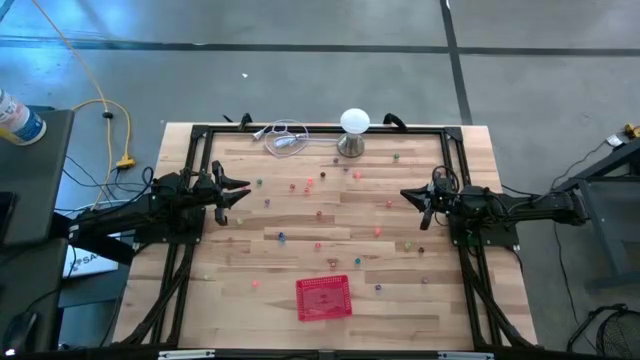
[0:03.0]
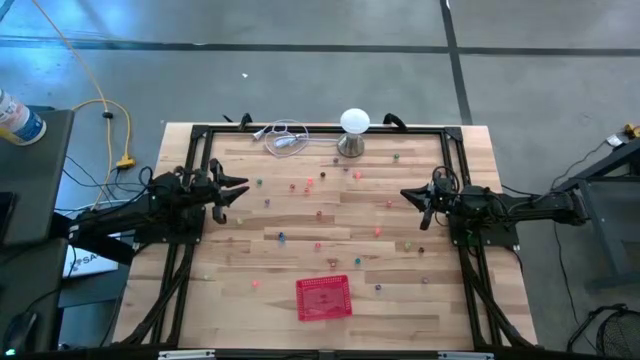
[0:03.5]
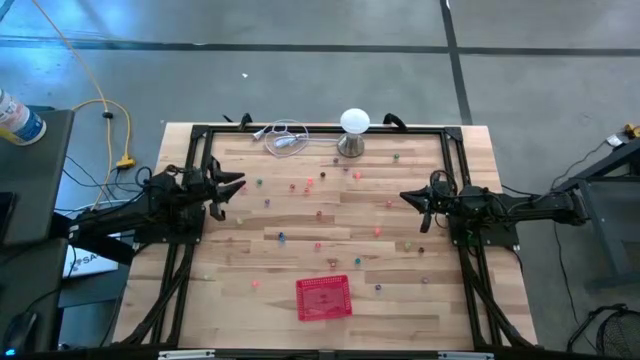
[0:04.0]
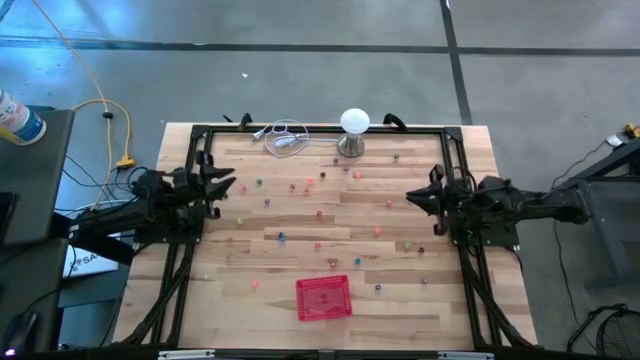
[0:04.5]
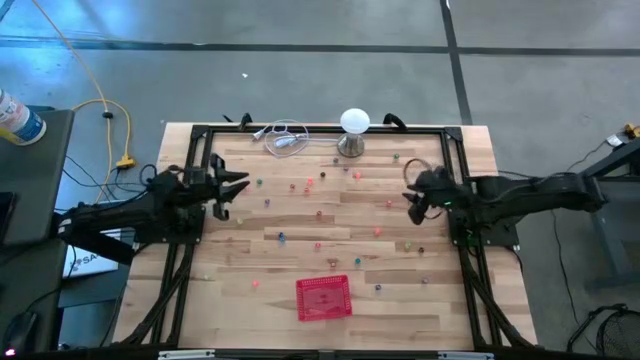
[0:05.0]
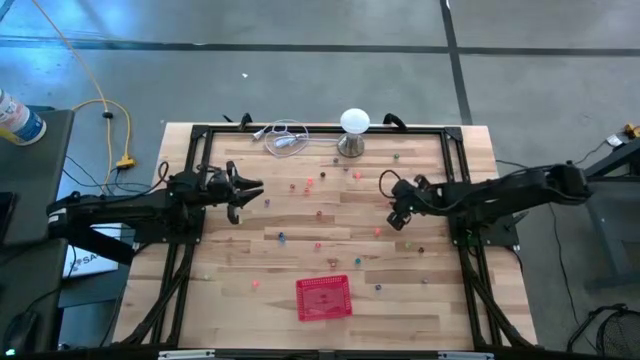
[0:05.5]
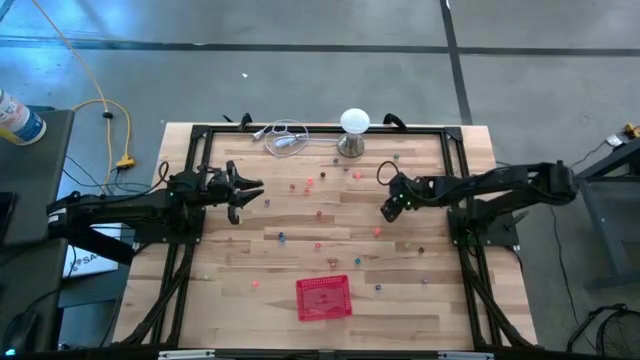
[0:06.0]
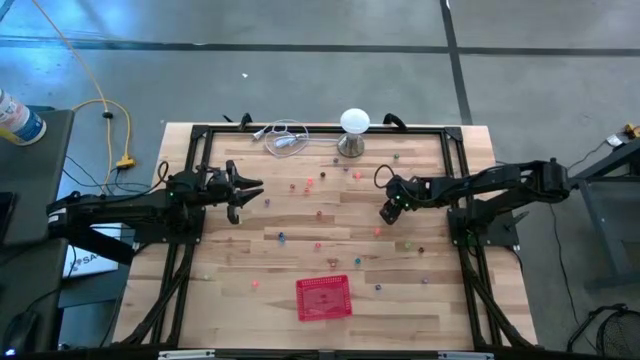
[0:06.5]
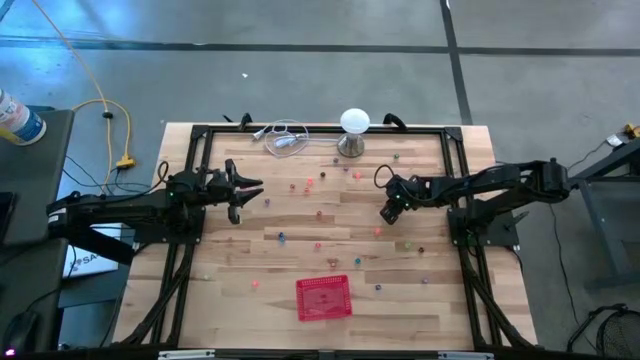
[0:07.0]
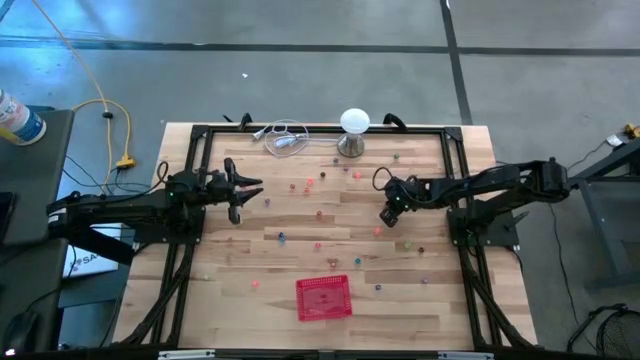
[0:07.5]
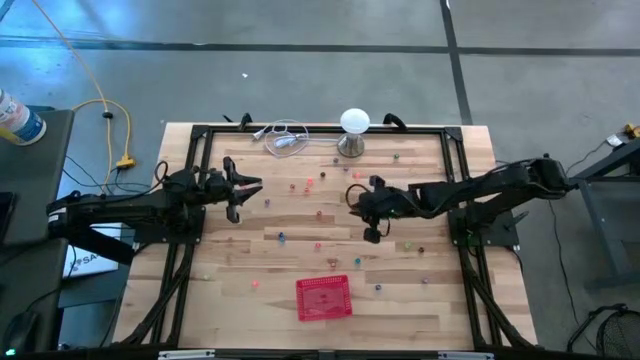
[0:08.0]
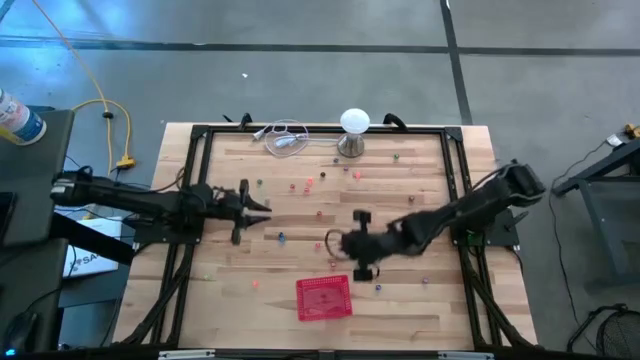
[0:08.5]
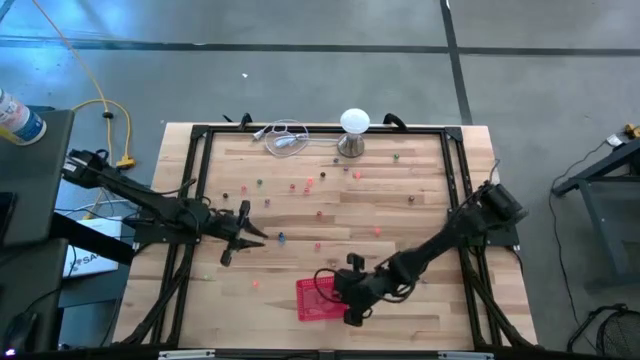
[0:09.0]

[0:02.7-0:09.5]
Task: Pick & Place Dice
Put the red dice into the red bin

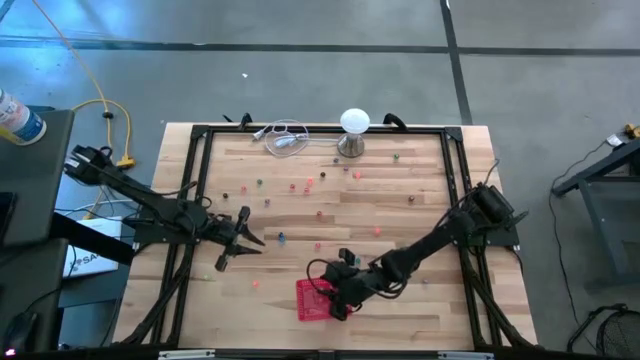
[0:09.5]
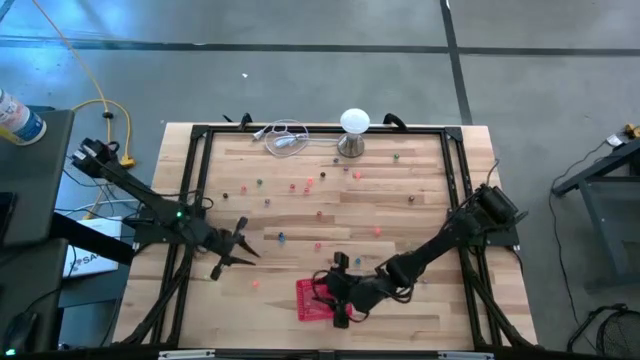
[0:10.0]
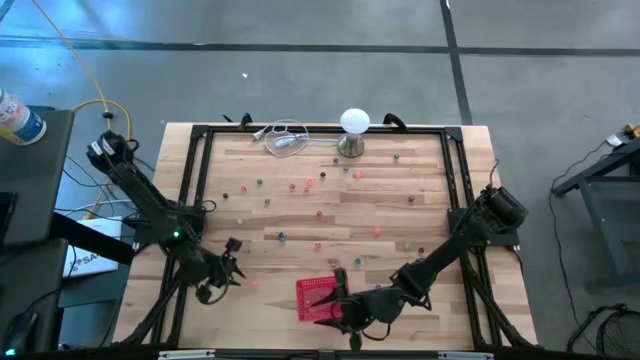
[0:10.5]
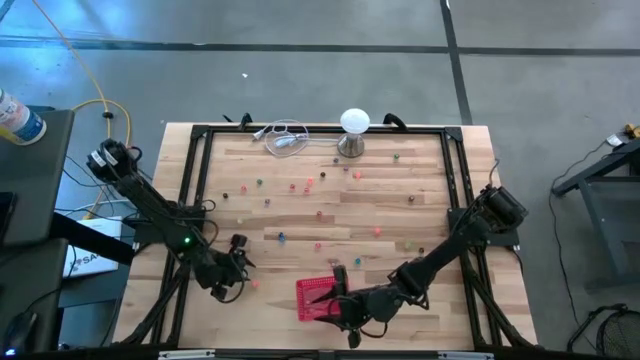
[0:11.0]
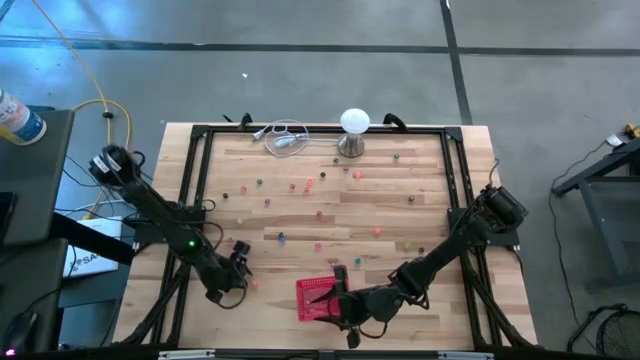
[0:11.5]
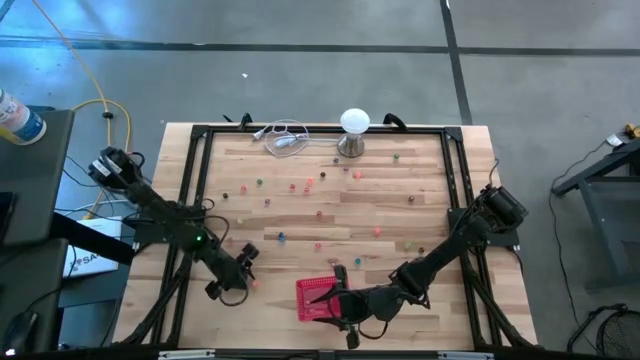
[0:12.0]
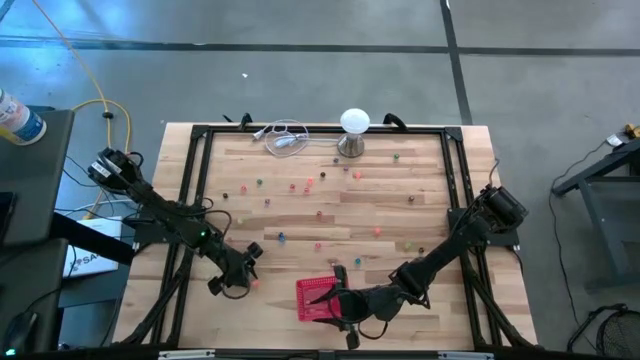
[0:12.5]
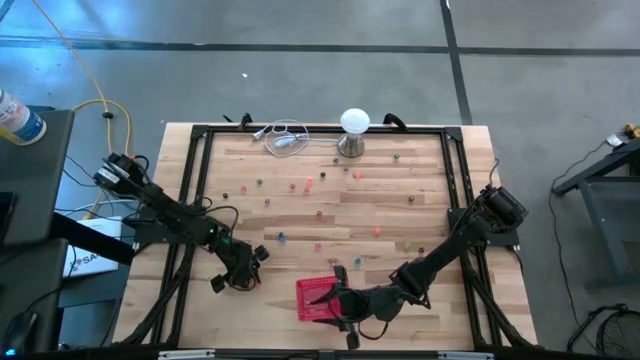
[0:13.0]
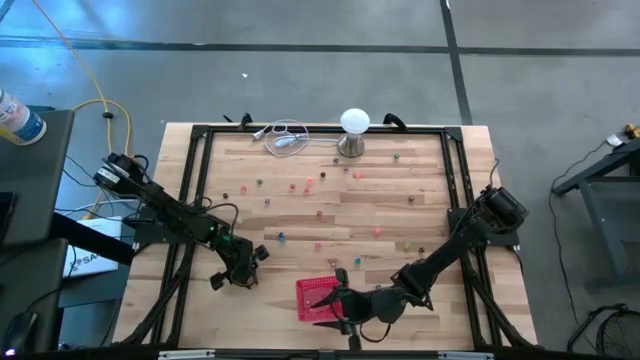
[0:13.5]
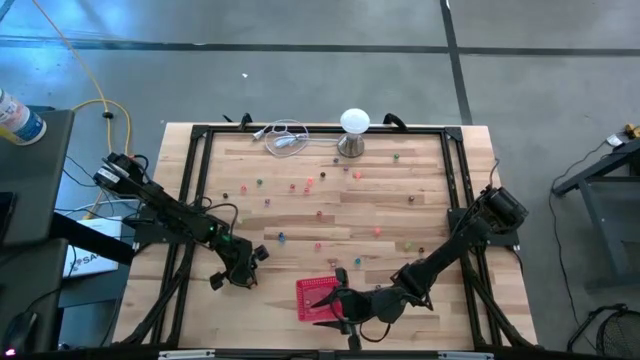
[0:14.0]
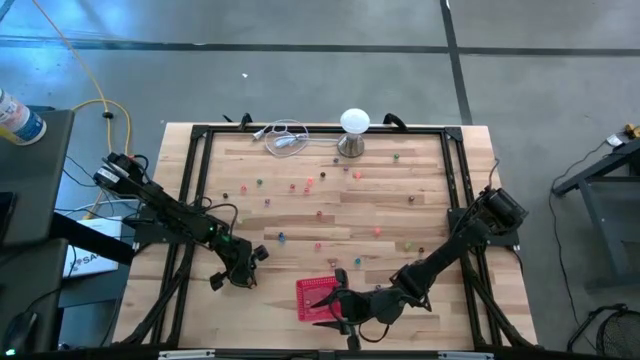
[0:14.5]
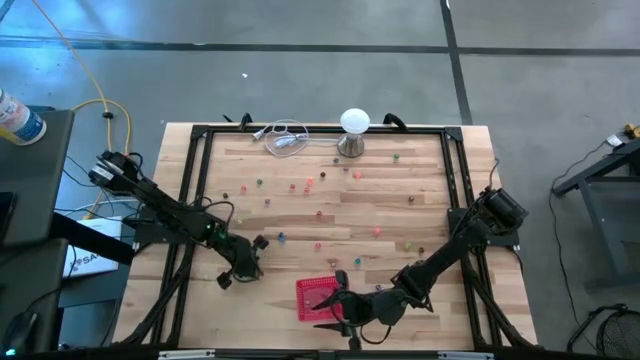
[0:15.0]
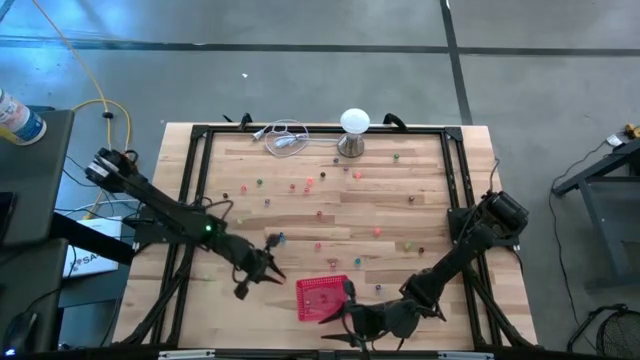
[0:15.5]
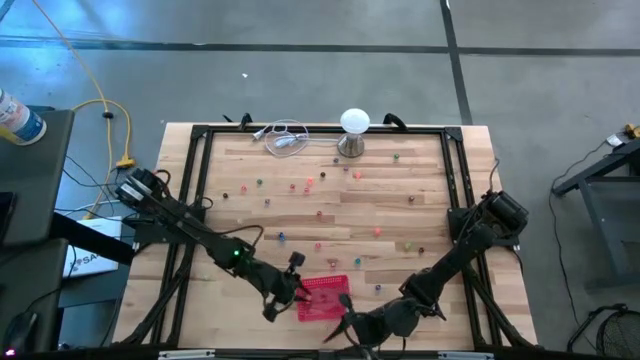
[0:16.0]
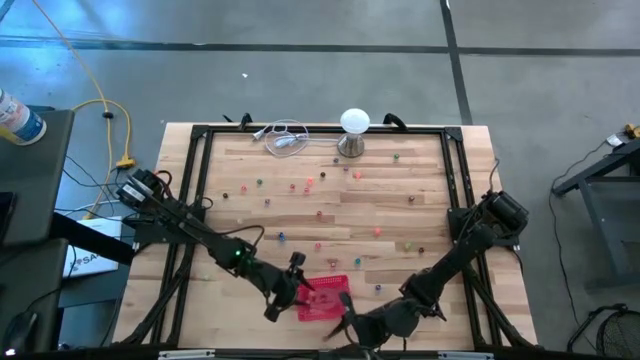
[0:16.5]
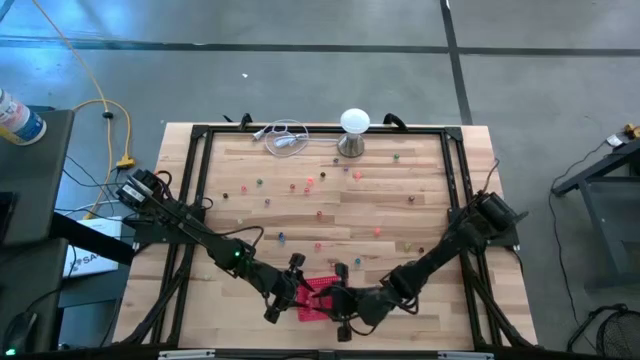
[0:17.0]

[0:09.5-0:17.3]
Put the orange dice into the red bin

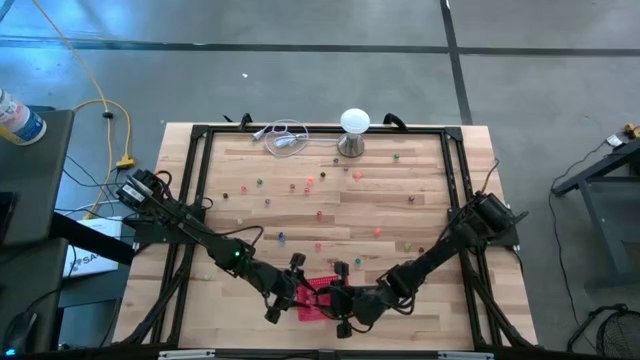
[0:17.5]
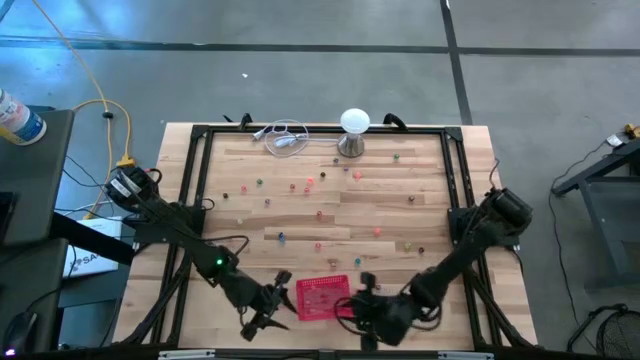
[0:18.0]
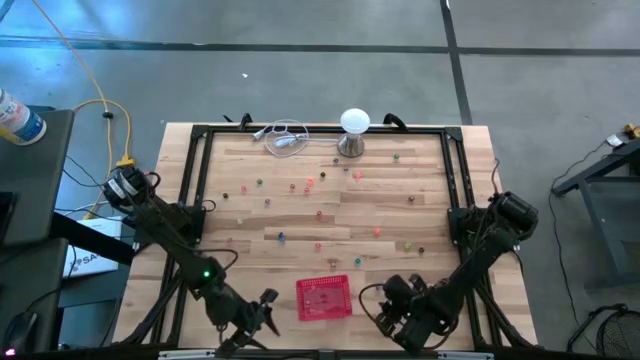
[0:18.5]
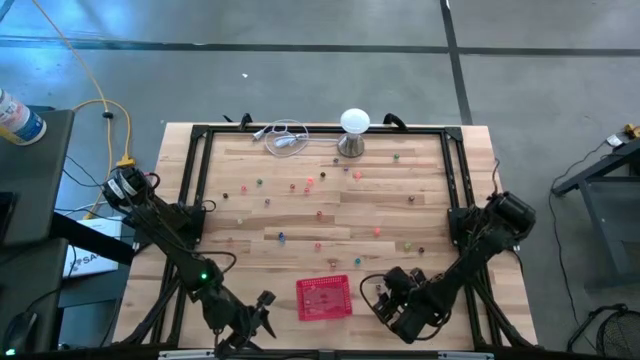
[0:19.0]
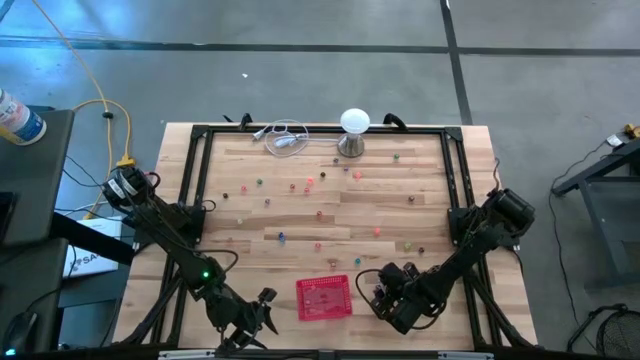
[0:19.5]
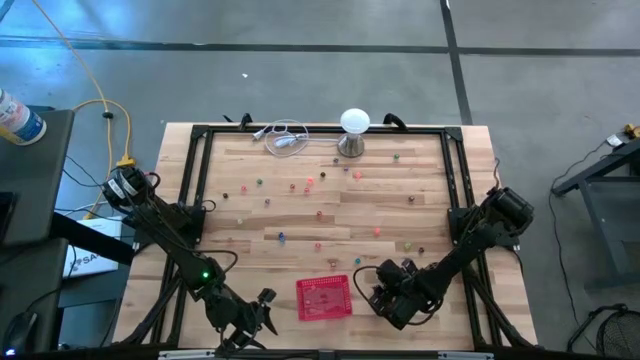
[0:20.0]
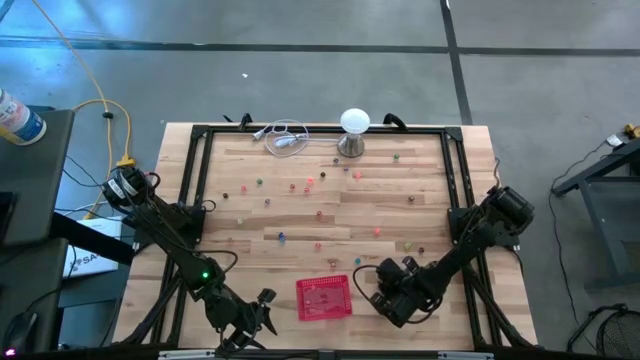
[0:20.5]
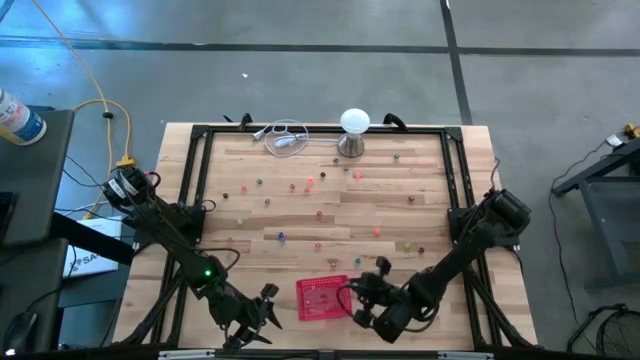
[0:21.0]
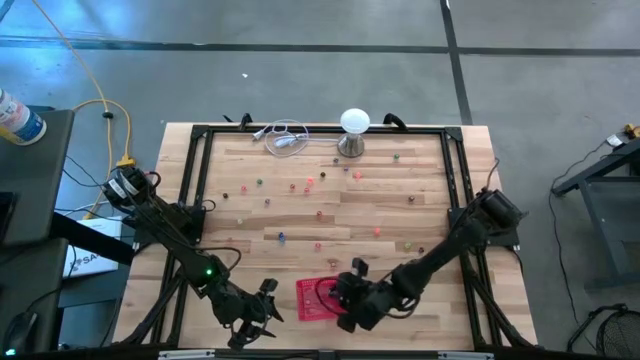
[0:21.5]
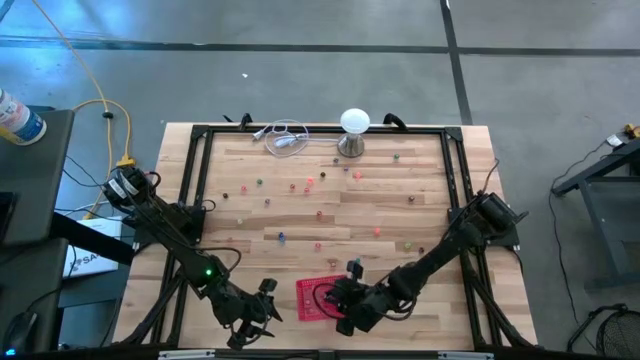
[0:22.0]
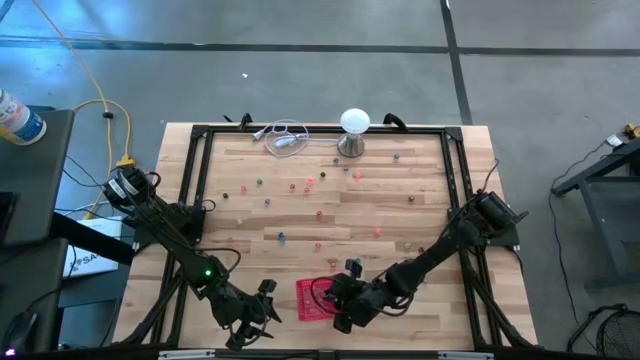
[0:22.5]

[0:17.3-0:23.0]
Put the dark blue dice into the red bin
